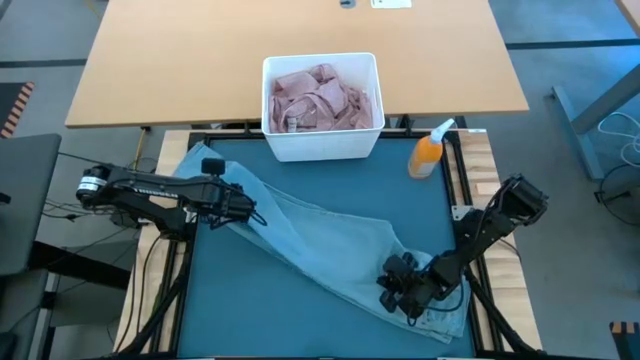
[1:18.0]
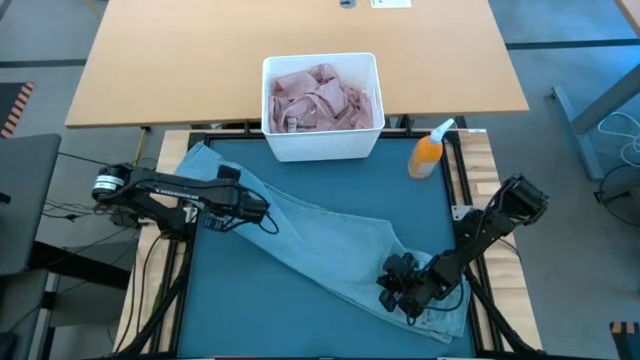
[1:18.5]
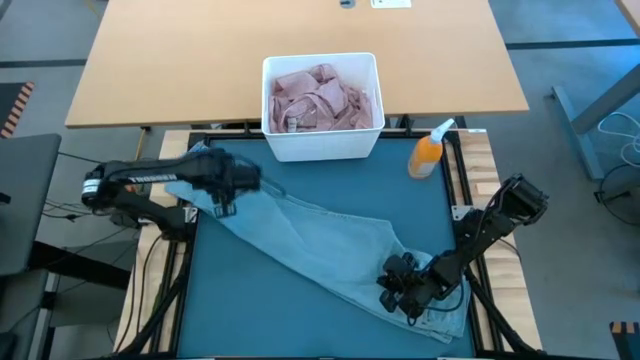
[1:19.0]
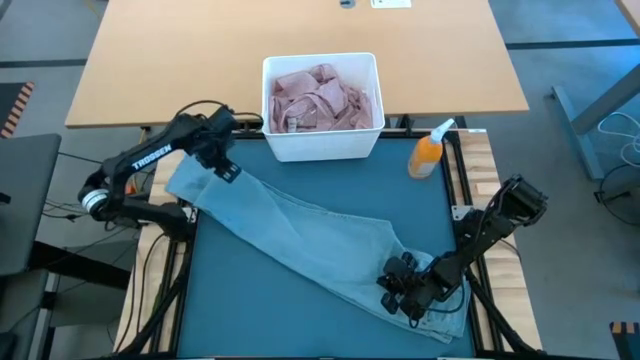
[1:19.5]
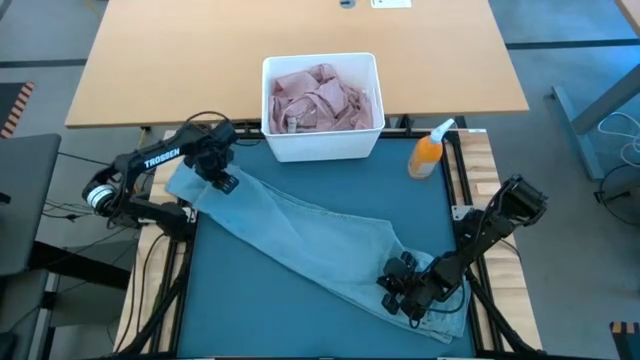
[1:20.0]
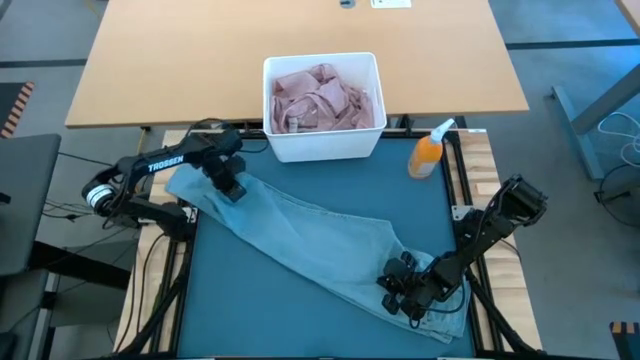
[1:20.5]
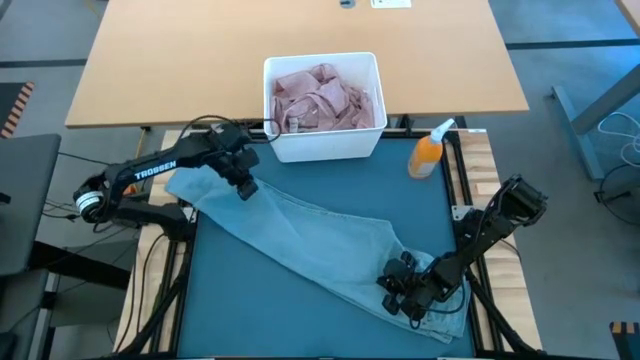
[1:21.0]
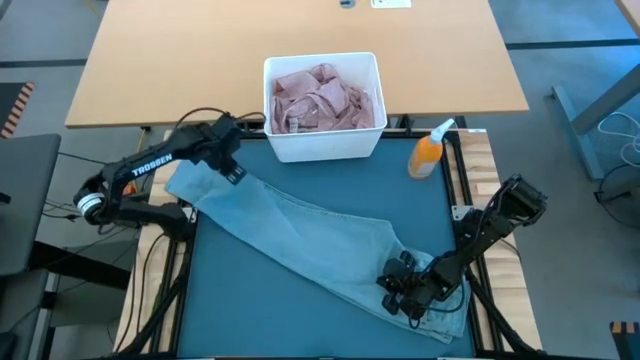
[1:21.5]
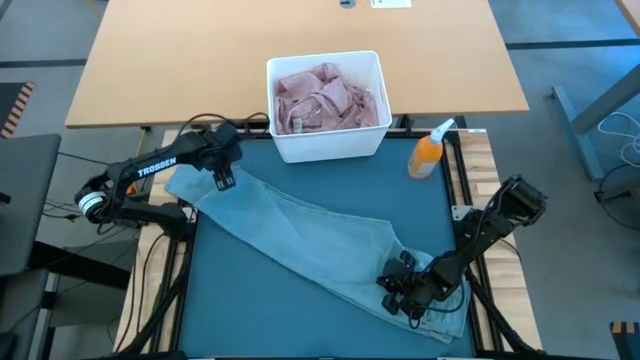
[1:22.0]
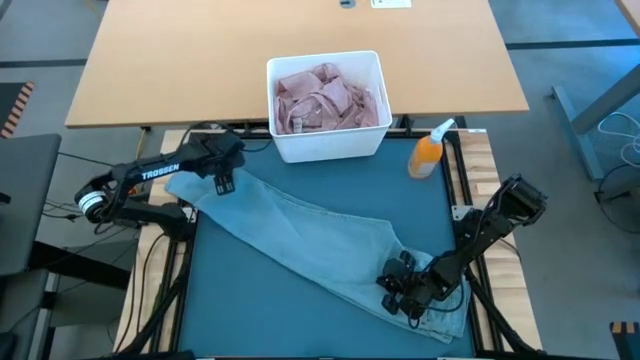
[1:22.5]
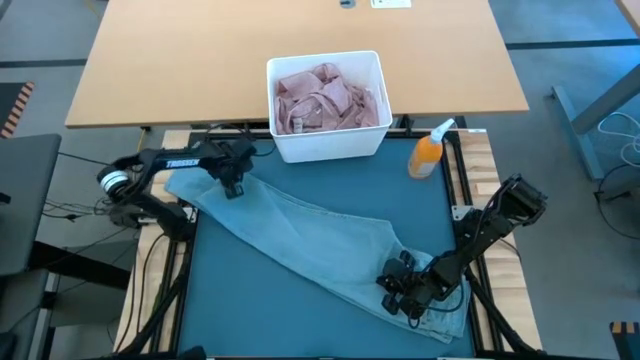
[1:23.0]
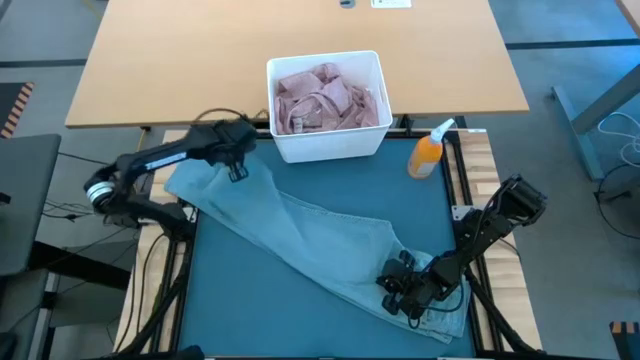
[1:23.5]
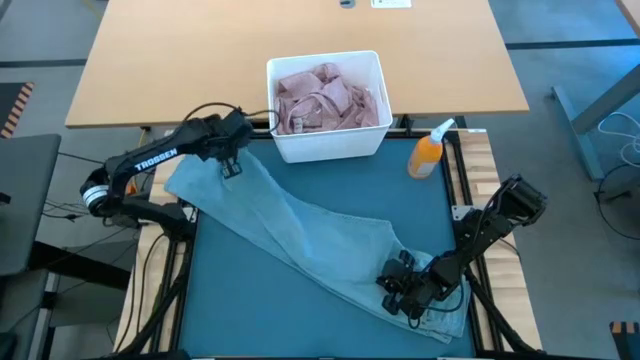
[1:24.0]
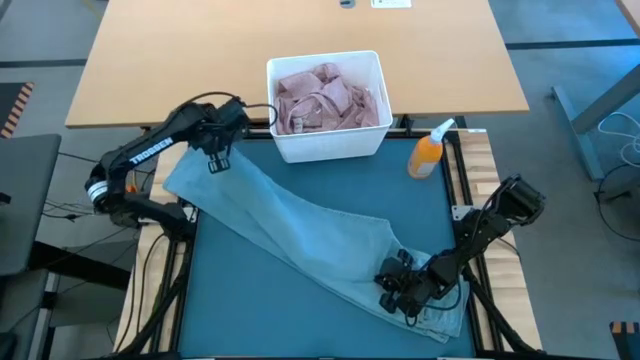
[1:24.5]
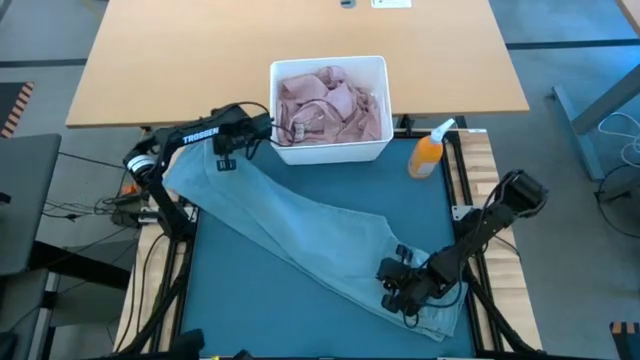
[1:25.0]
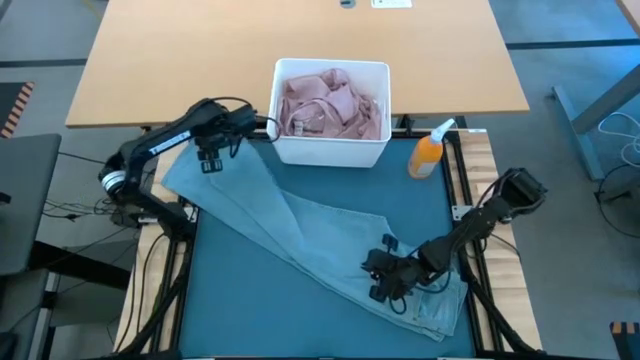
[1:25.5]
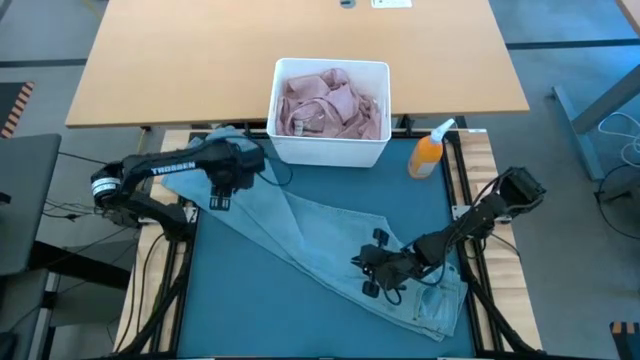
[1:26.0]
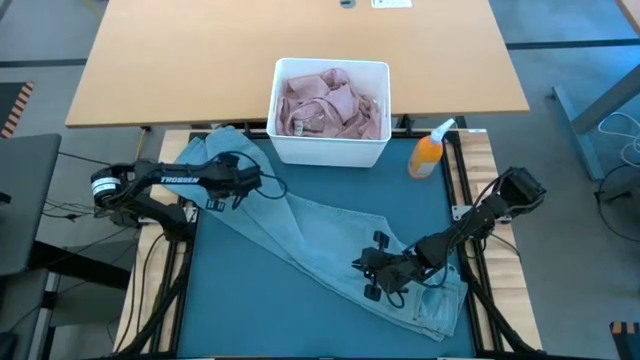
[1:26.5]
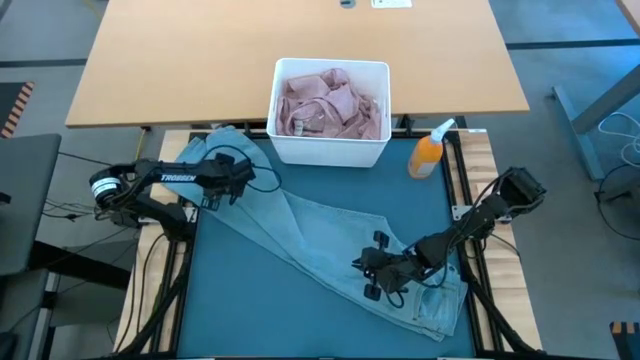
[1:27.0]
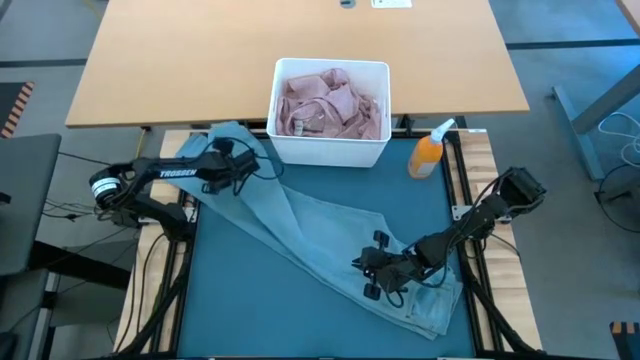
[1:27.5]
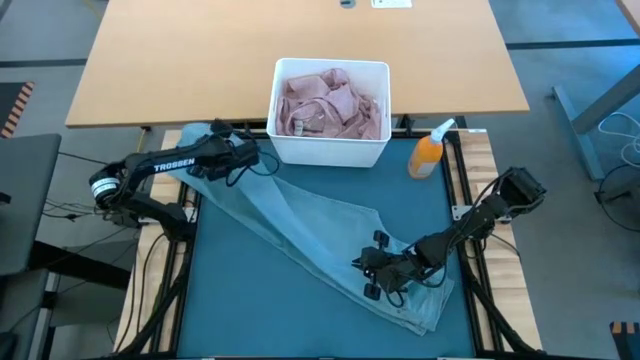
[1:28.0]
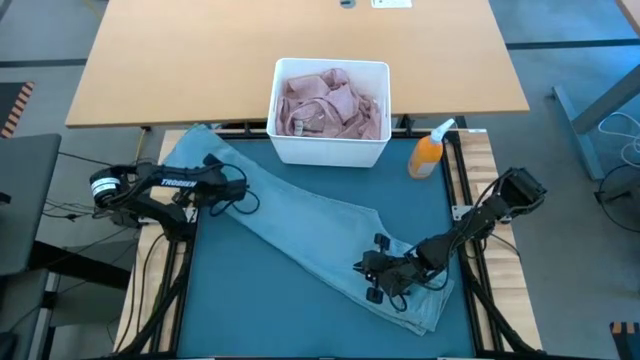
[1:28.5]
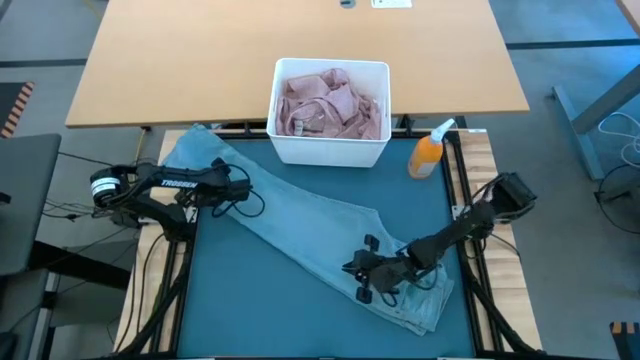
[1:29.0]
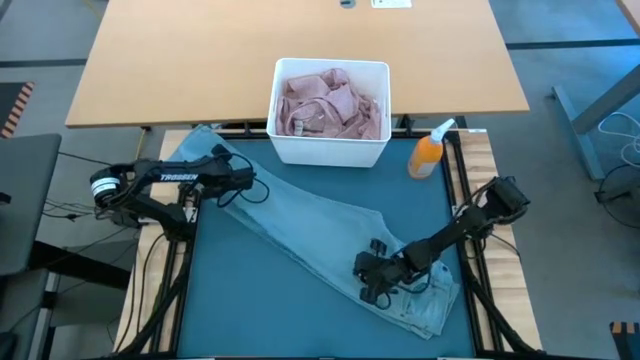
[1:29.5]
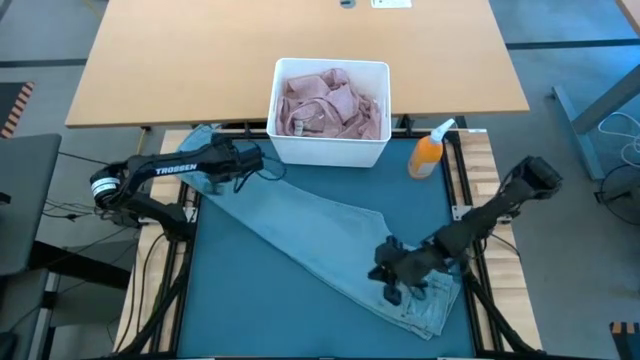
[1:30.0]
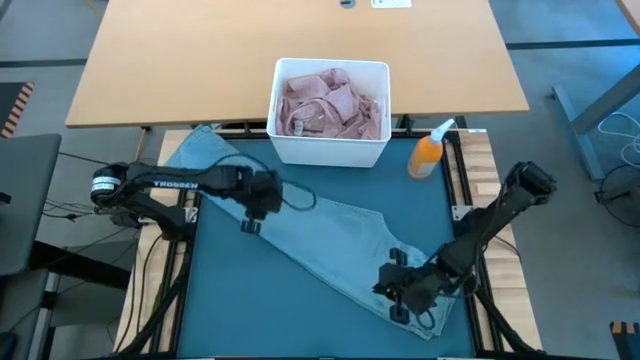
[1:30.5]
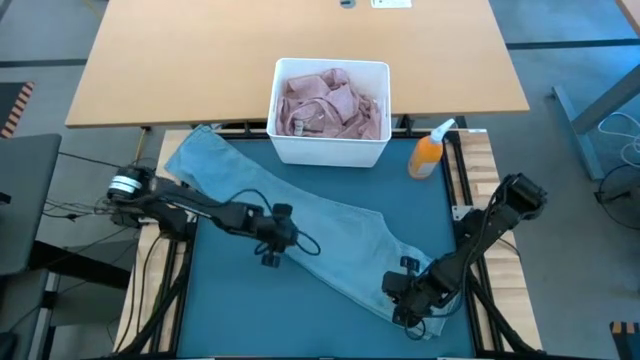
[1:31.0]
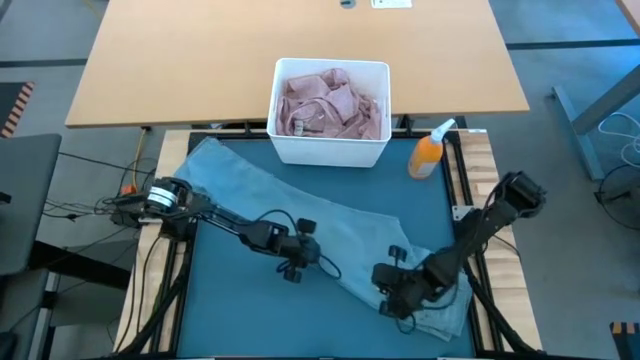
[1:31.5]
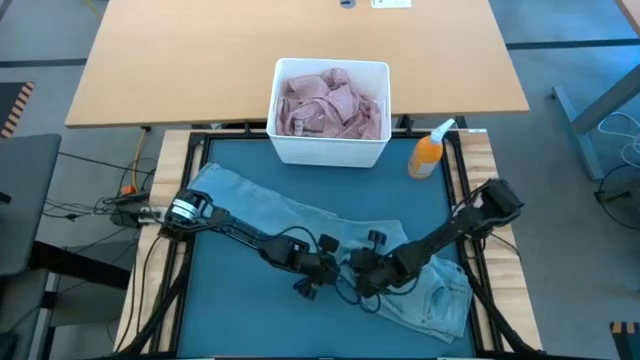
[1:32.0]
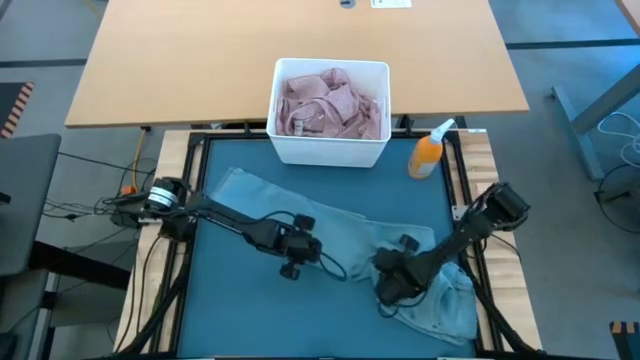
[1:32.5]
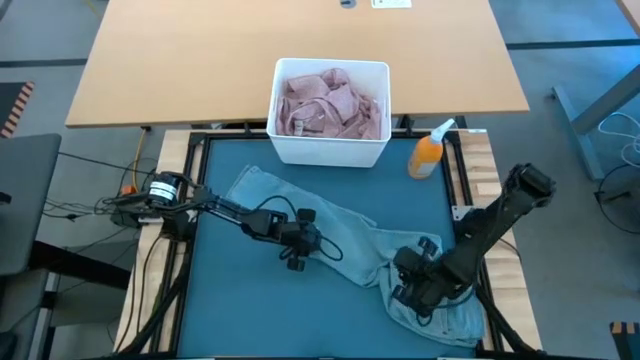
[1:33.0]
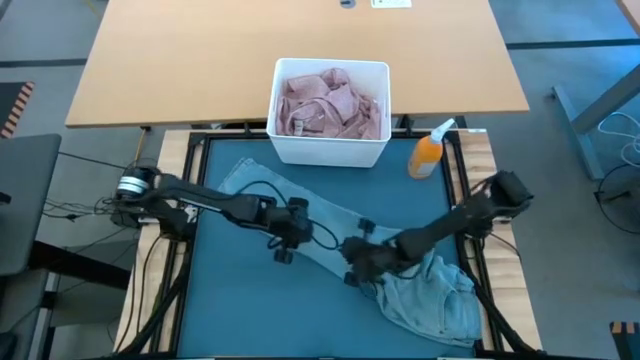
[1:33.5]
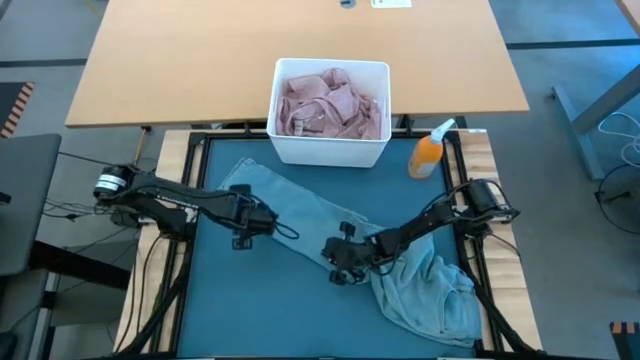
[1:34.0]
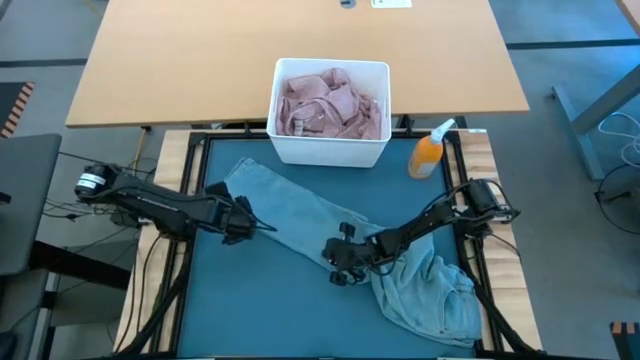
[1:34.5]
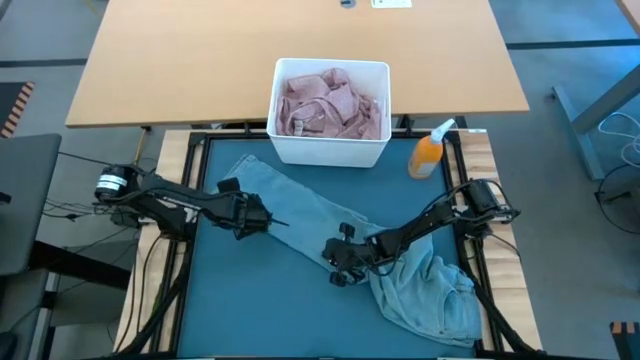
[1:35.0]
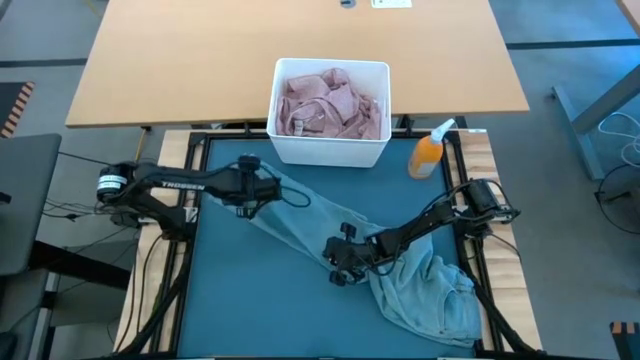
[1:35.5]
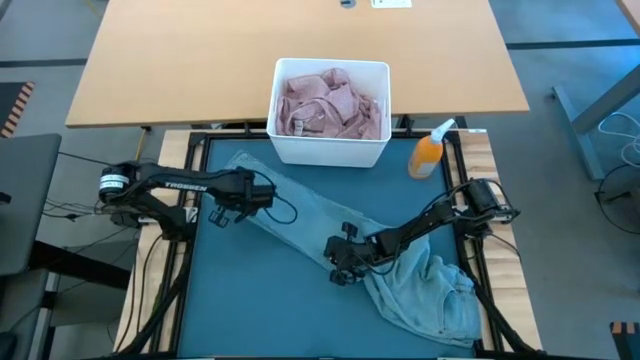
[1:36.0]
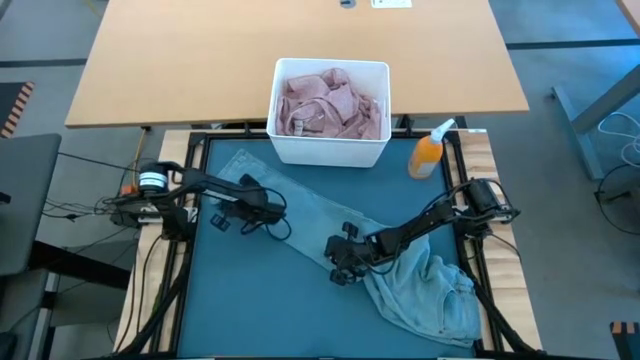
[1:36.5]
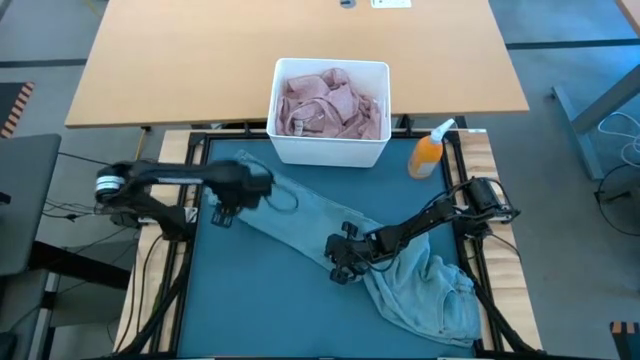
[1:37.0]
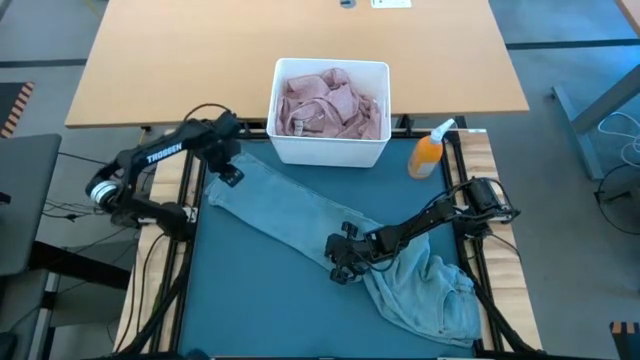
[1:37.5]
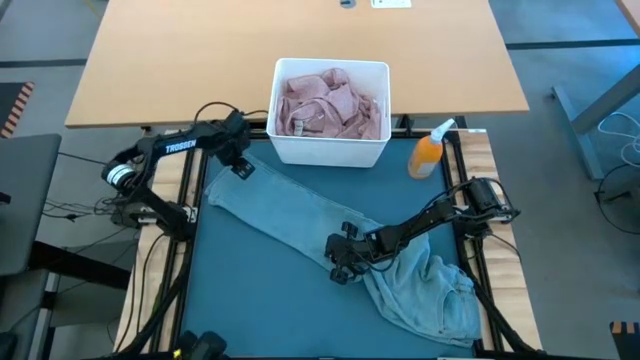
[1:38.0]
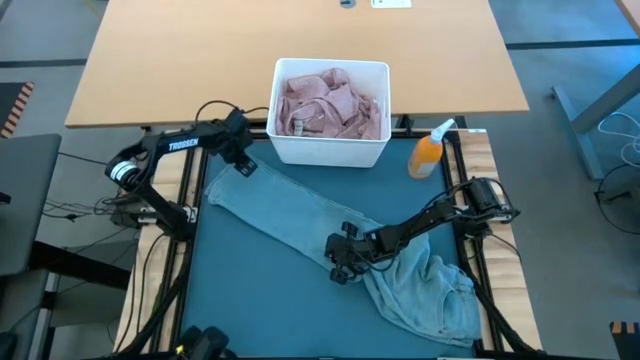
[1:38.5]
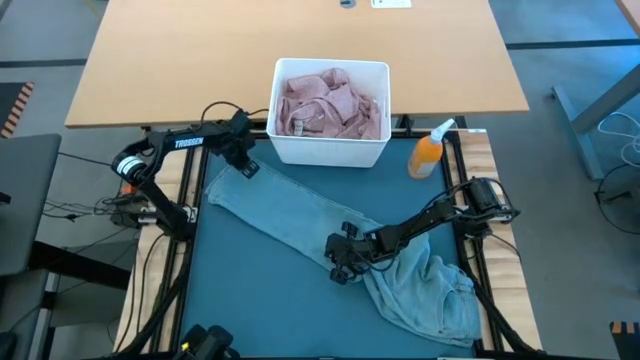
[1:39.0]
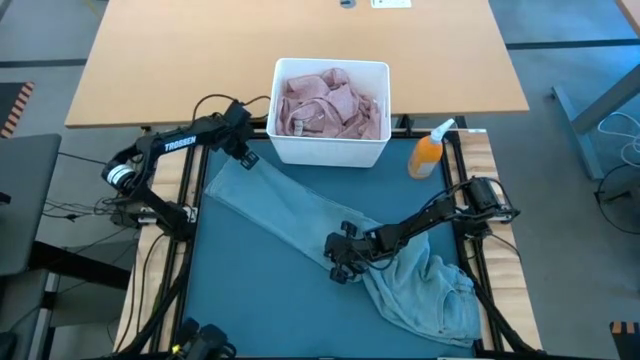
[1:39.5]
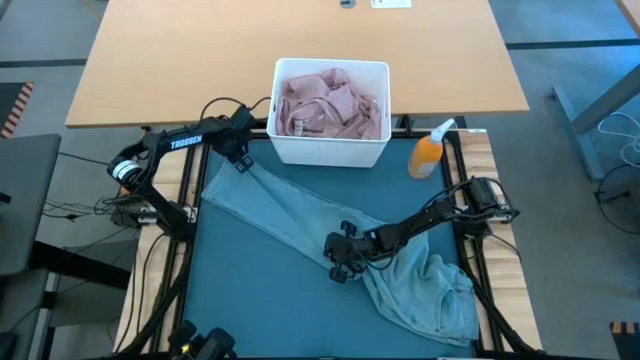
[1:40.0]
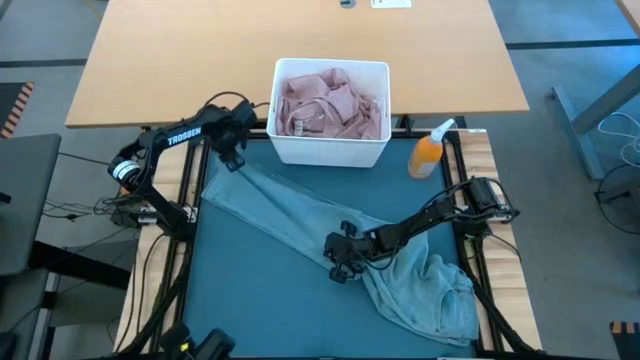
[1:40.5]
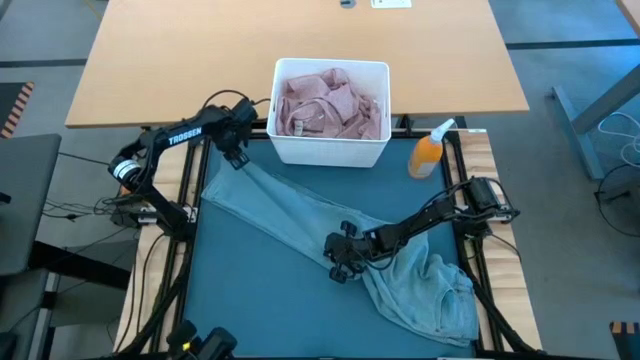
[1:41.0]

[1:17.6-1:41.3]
Task: Fold Laundry from Bin
Fold the blue pants
